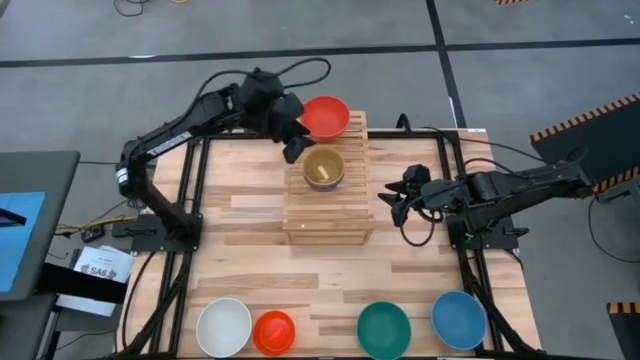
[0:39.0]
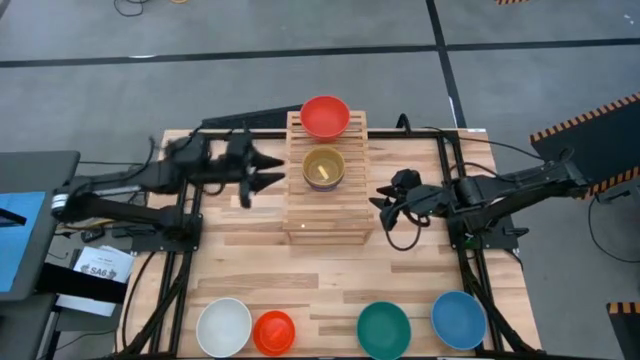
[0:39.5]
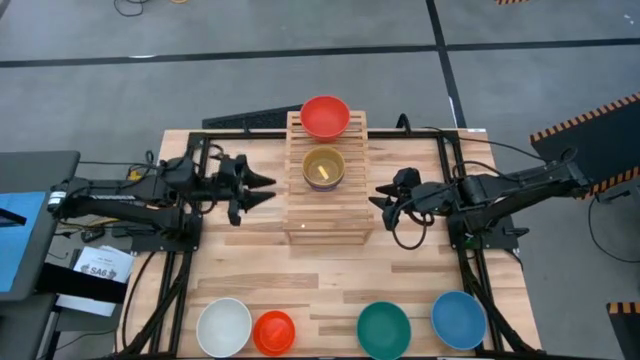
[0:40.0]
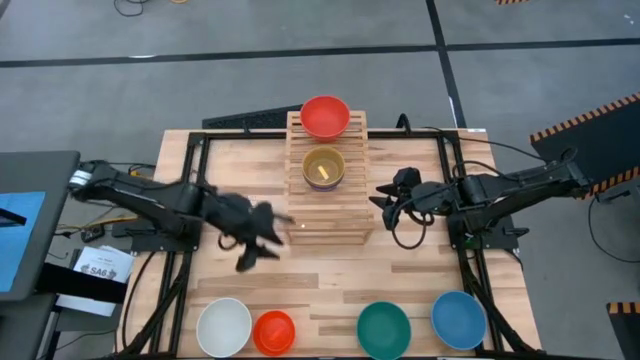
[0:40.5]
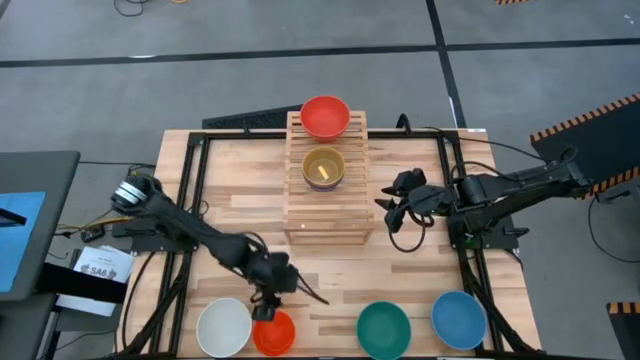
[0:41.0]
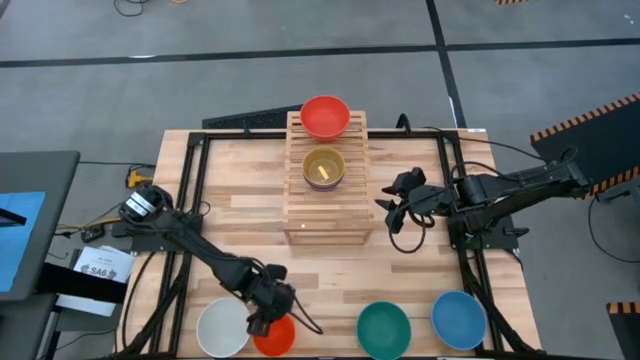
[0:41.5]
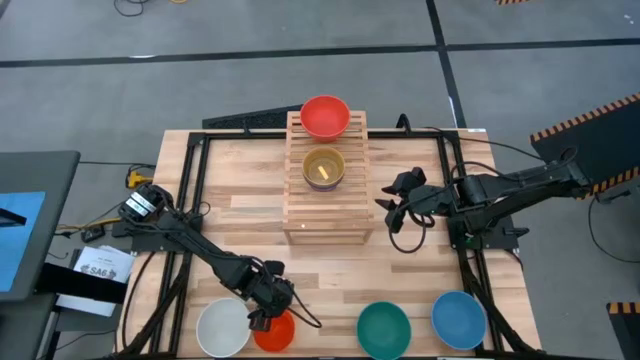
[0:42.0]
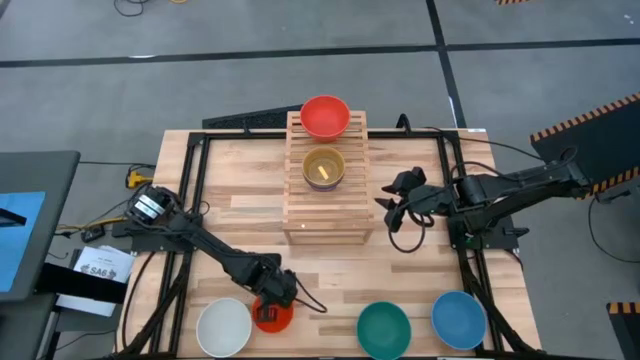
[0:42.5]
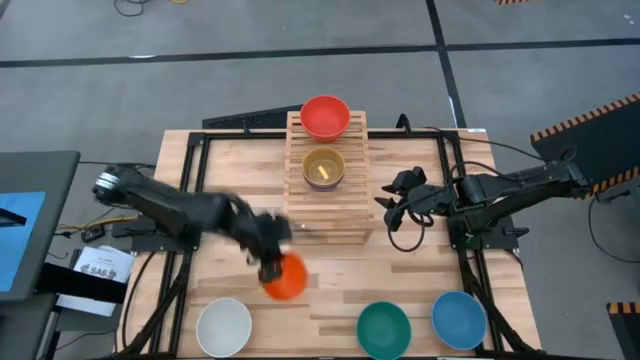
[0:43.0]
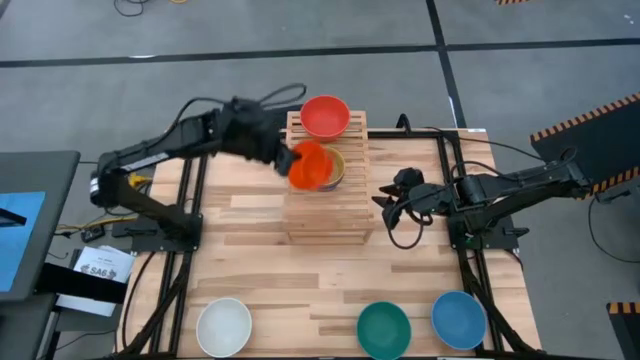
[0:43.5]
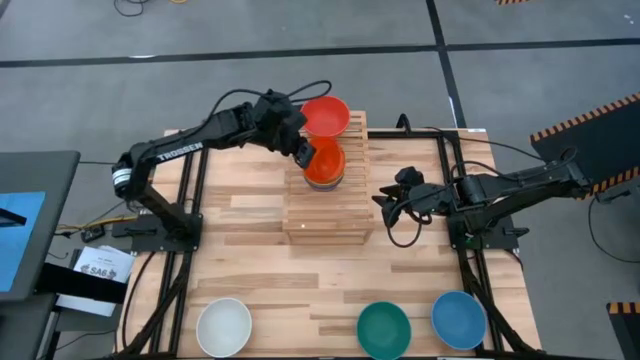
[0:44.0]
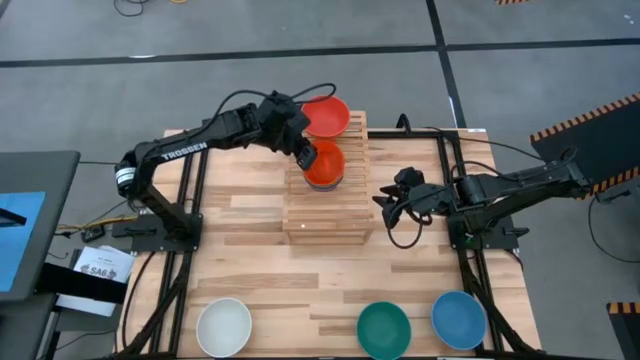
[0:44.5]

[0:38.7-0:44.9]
Task: Place and stack bowls onto a shelf
Stack the small orange bowl on top of the small yellow bowl on the shelf

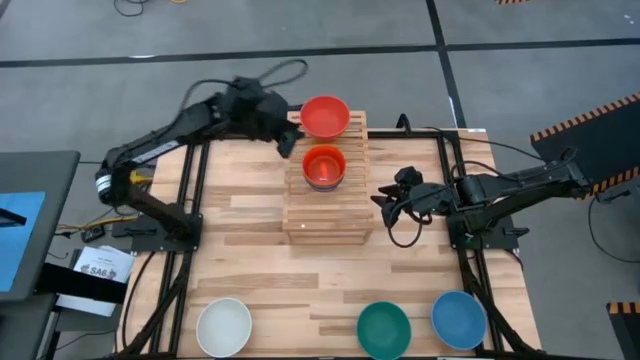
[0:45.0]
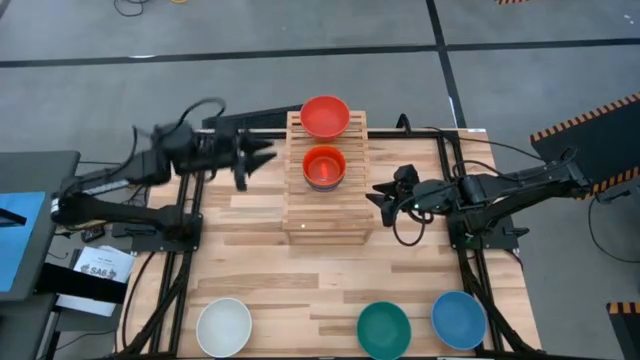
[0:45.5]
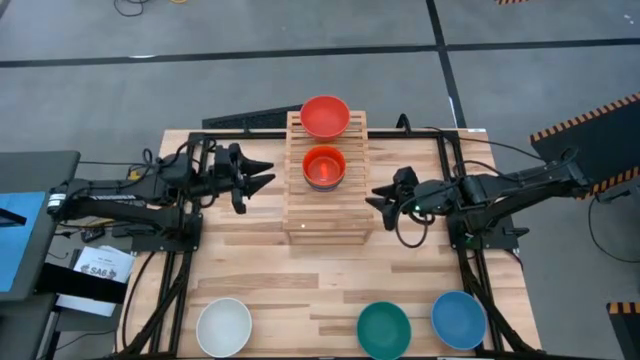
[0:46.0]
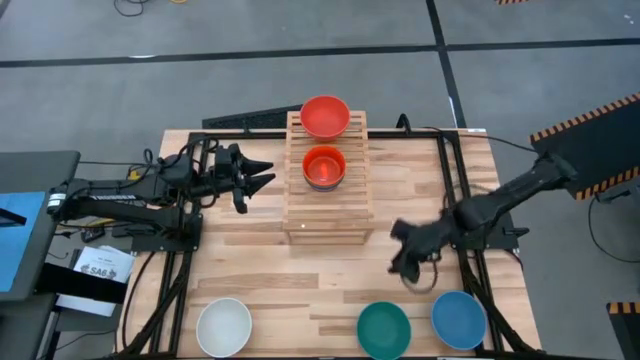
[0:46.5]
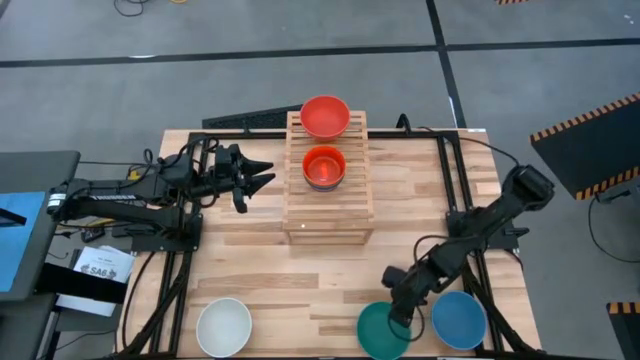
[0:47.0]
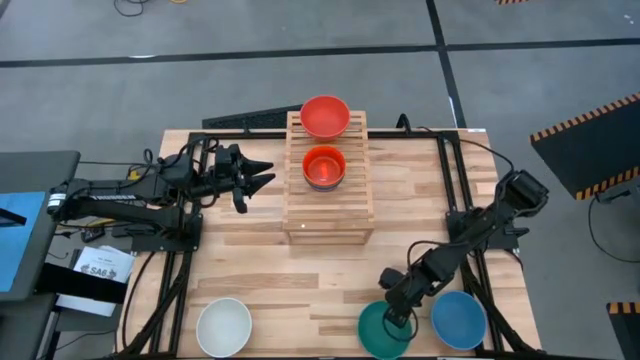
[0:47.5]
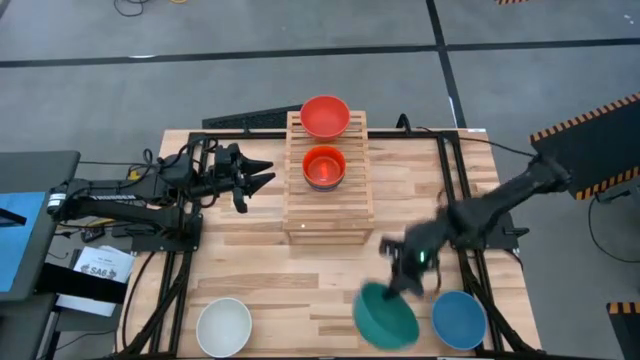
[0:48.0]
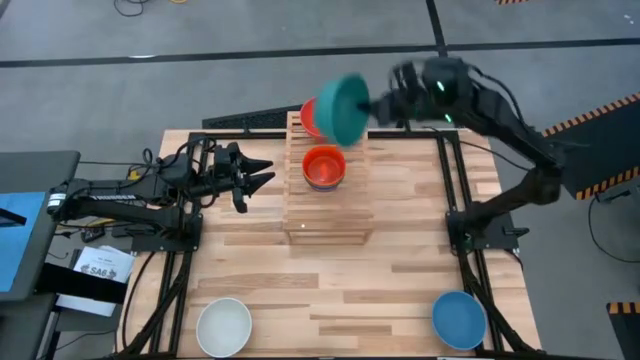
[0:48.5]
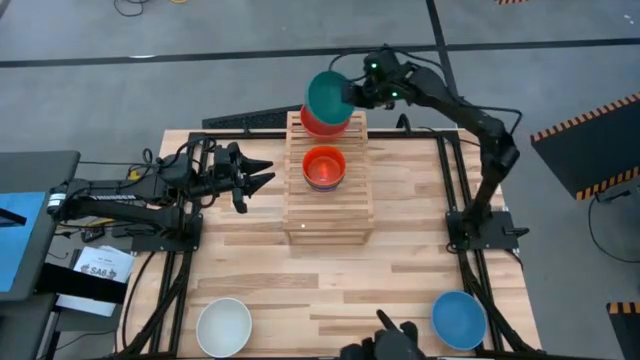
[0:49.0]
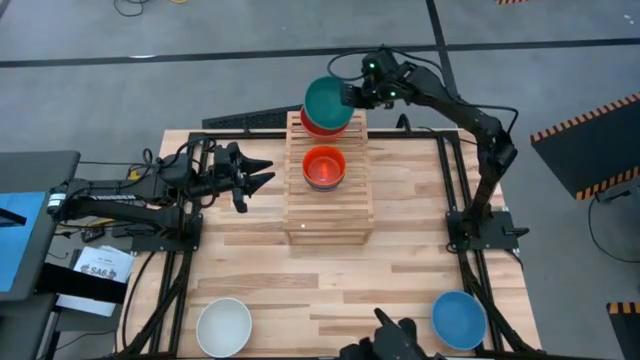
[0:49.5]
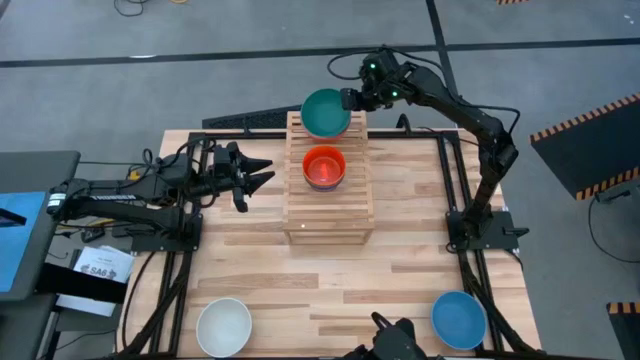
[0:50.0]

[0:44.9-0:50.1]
Stack the big green bowl on top of the big orange bowl on the shelf

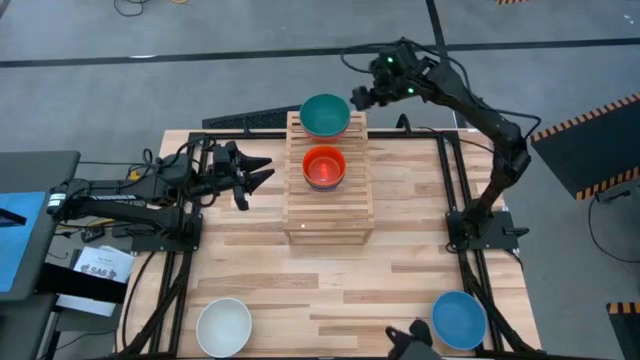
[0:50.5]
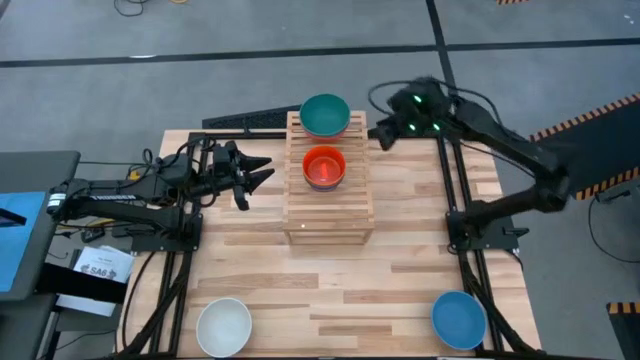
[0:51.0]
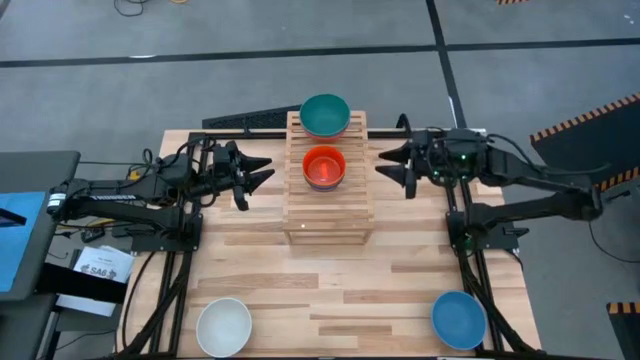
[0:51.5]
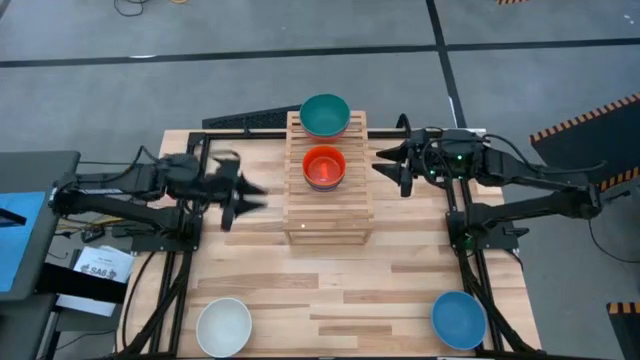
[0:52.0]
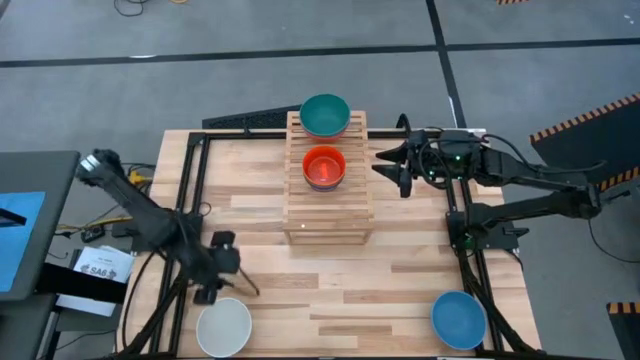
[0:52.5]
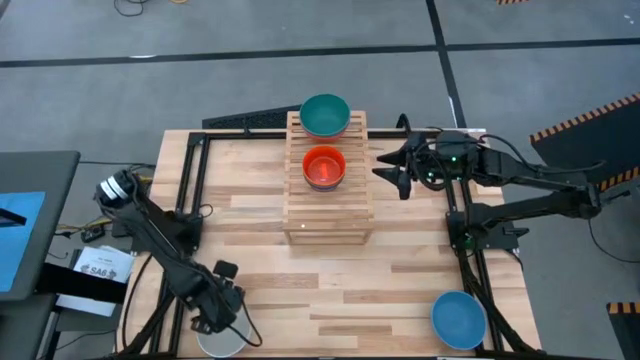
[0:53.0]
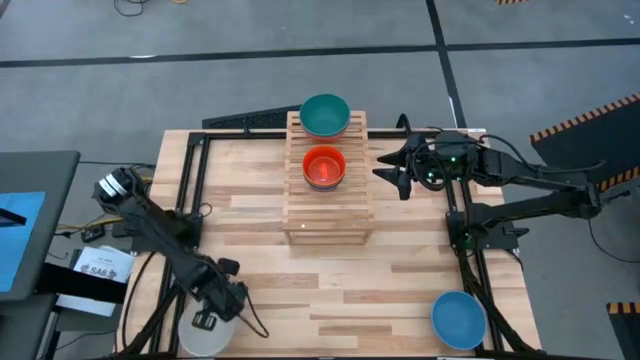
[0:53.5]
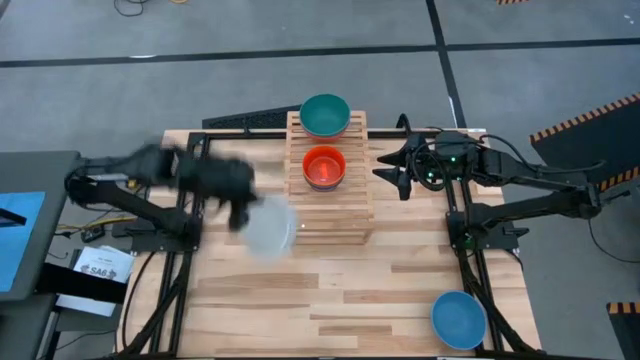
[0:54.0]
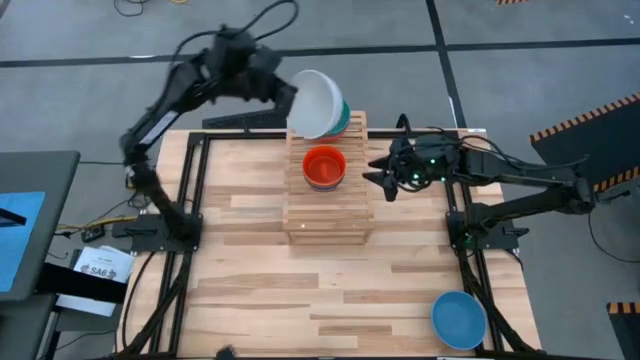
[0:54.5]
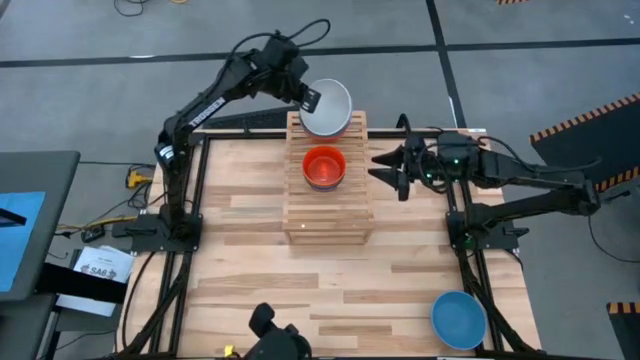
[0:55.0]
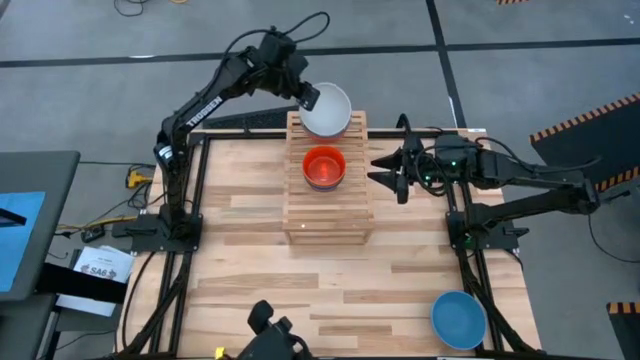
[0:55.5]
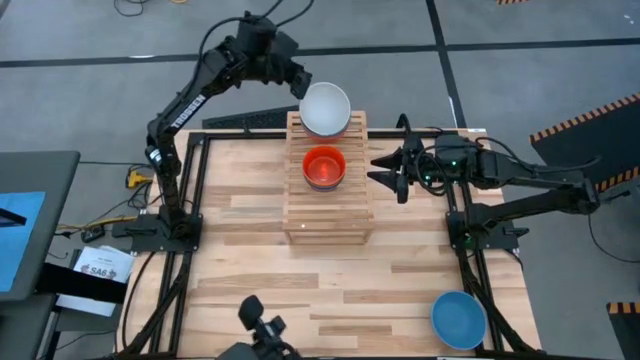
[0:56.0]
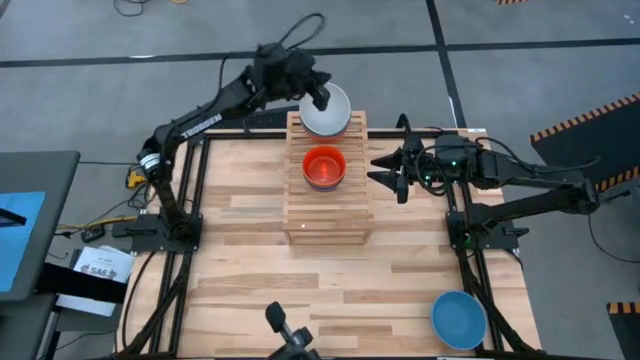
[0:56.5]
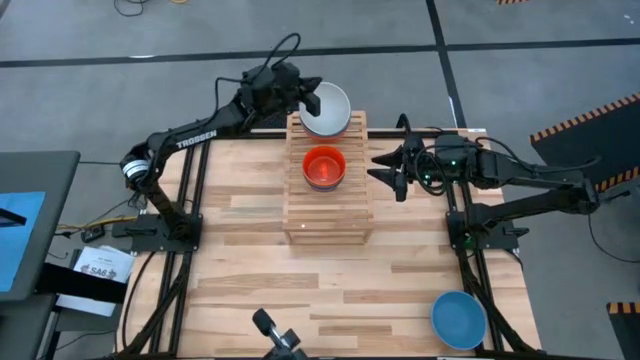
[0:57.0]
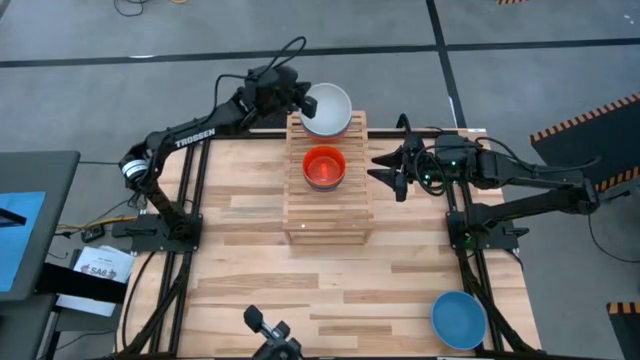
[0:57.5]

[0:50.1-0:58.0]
Stack the big white bowl on top of the big green bowl on the shelf

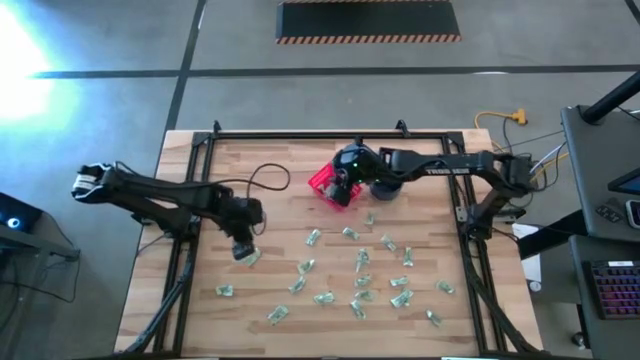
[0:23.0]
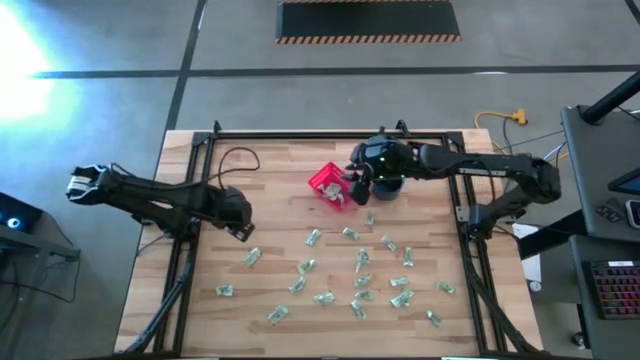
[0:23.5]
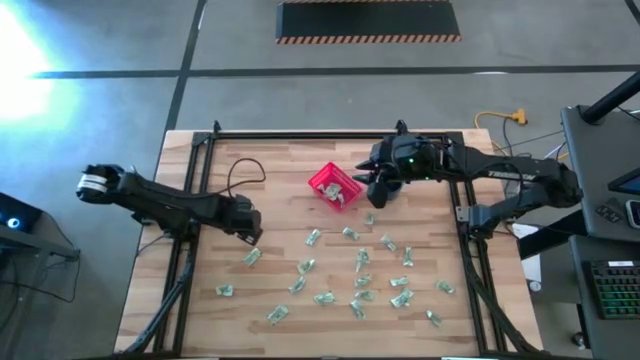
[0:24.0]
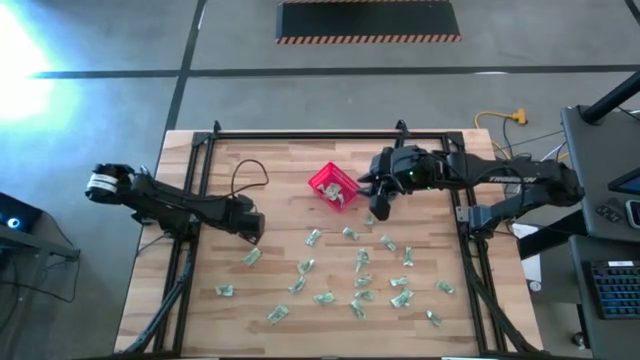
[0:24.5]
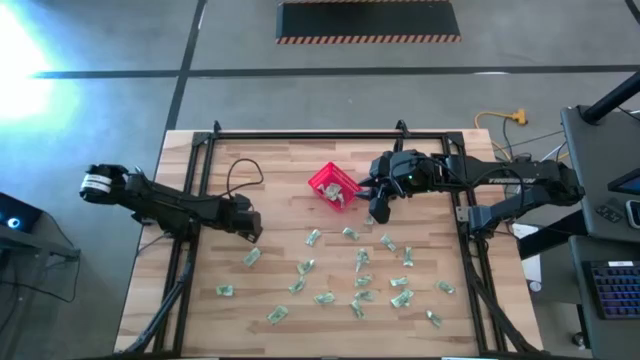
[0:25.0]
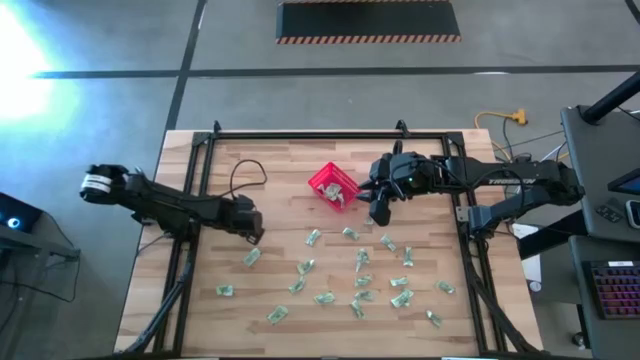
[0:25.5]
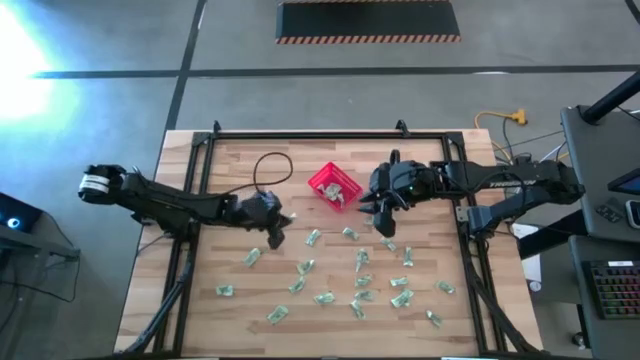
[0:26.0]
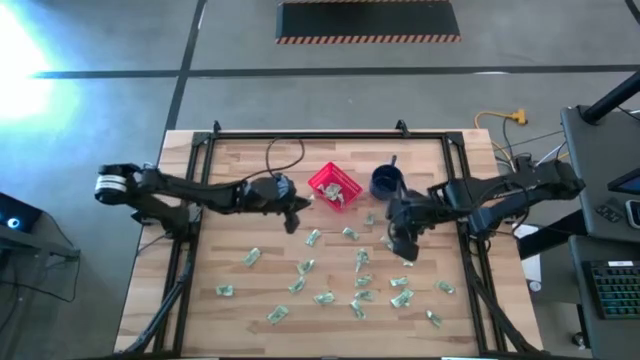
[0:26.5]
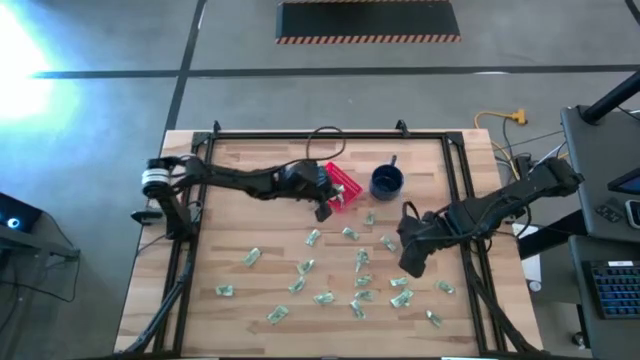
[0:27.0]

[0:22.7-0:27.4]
Task: Pick and place Stevia / Truvia into bins
Put the stevia packet into the red basket
